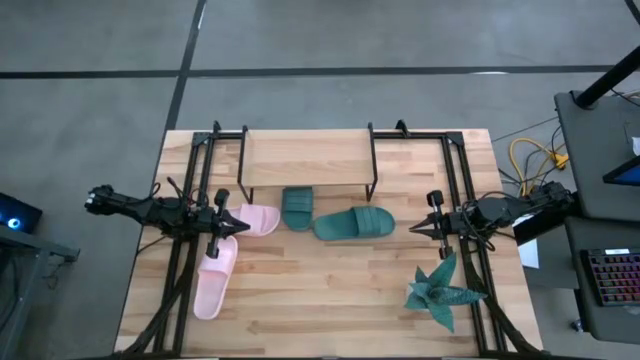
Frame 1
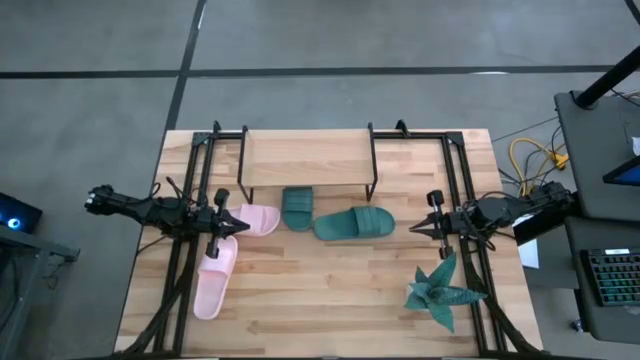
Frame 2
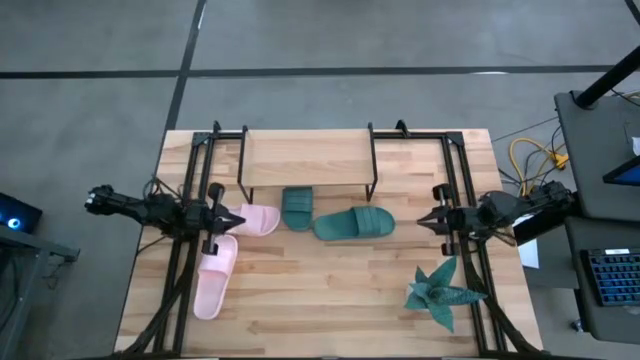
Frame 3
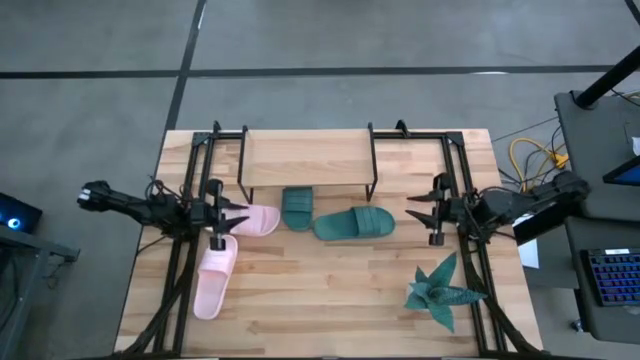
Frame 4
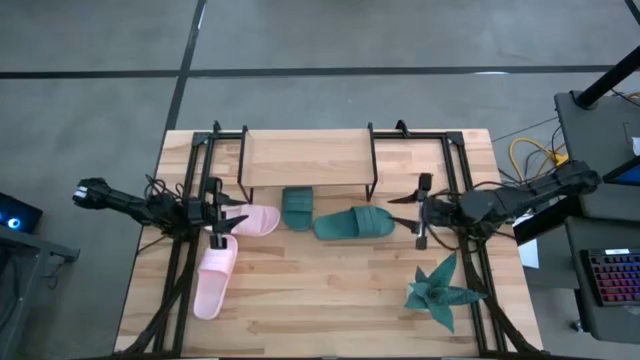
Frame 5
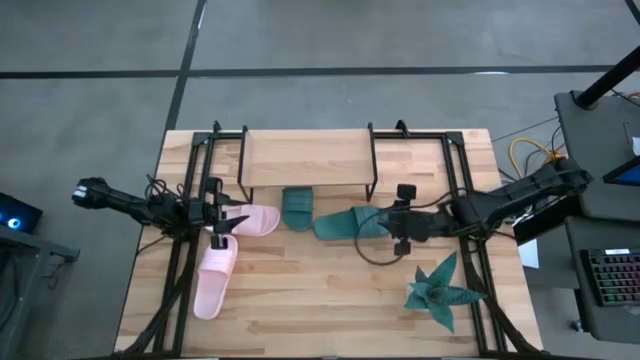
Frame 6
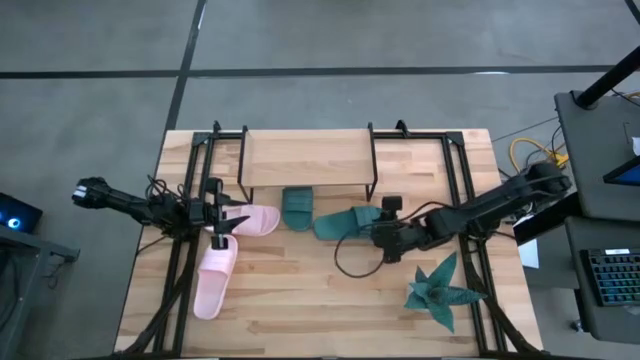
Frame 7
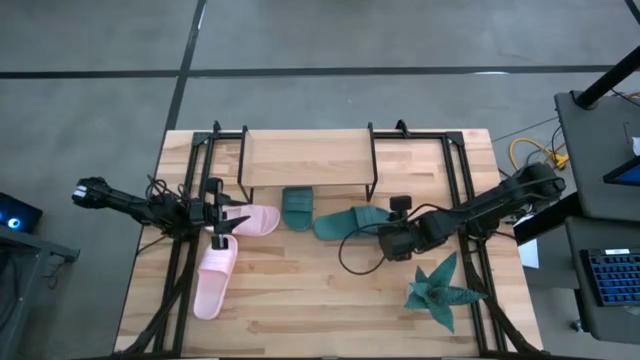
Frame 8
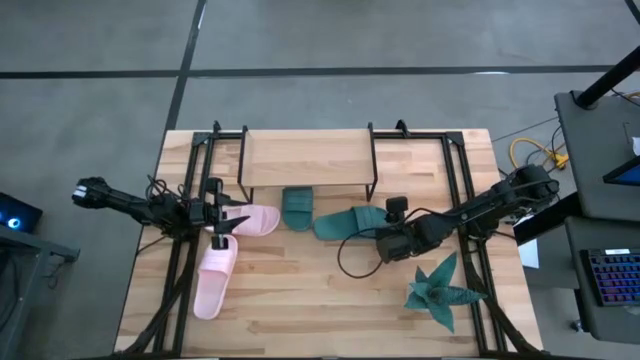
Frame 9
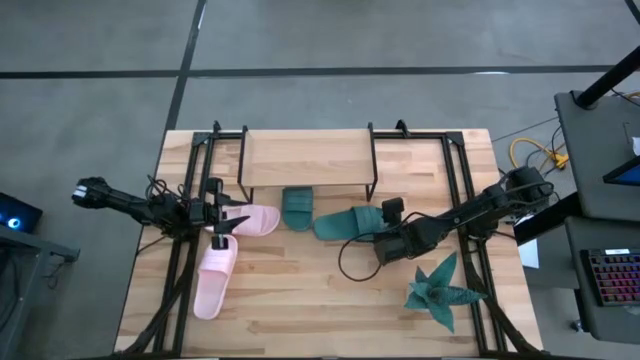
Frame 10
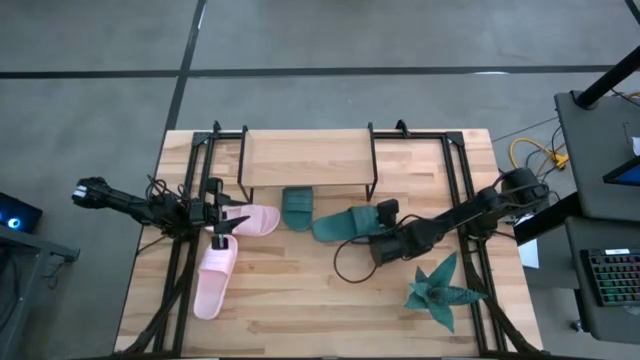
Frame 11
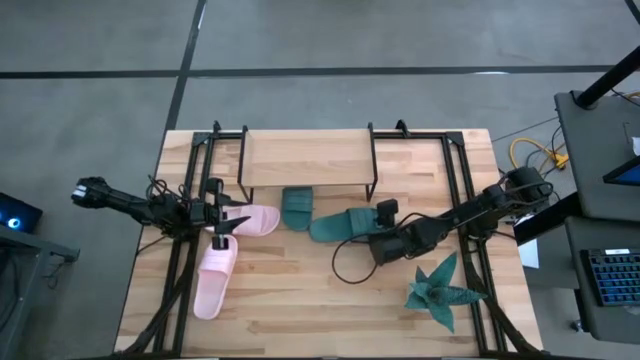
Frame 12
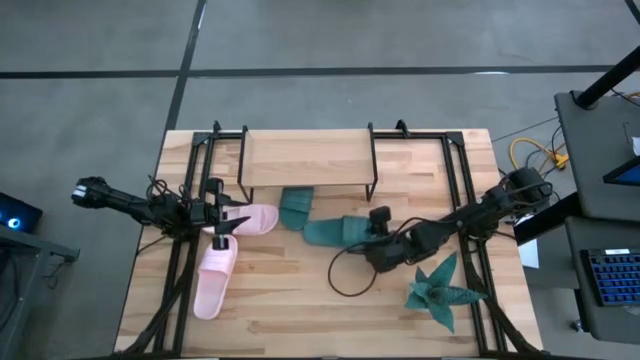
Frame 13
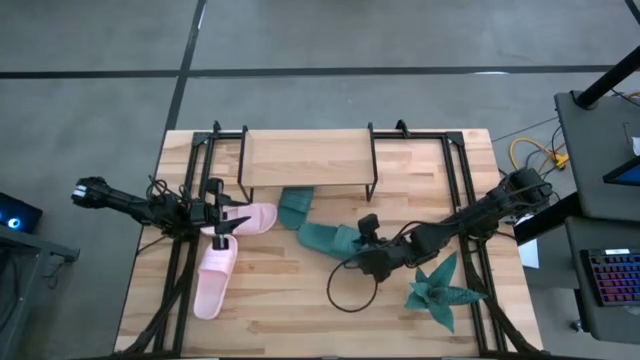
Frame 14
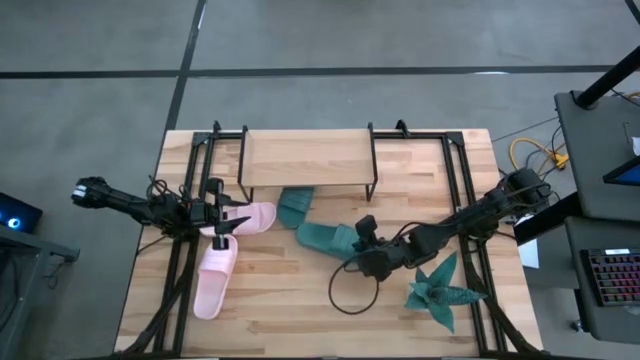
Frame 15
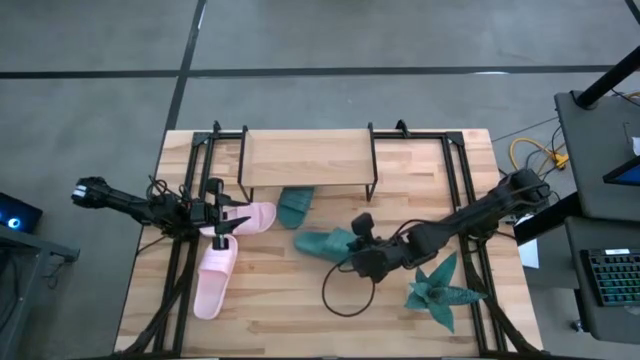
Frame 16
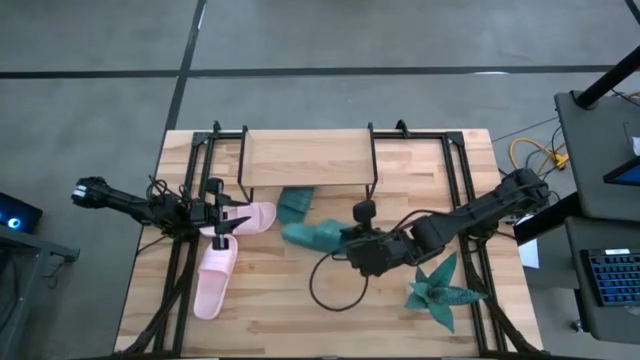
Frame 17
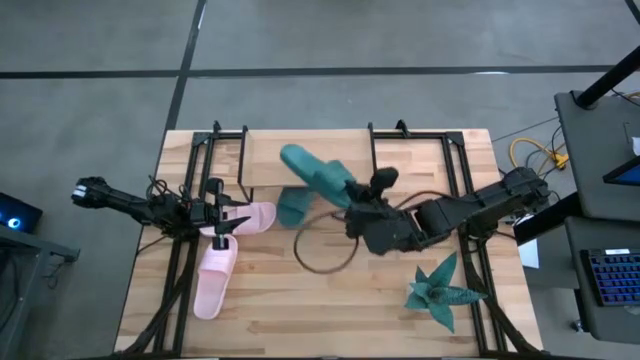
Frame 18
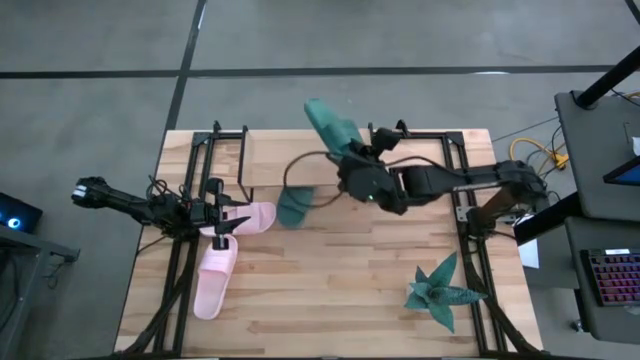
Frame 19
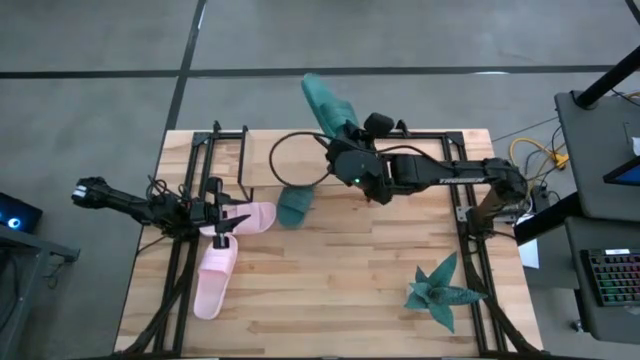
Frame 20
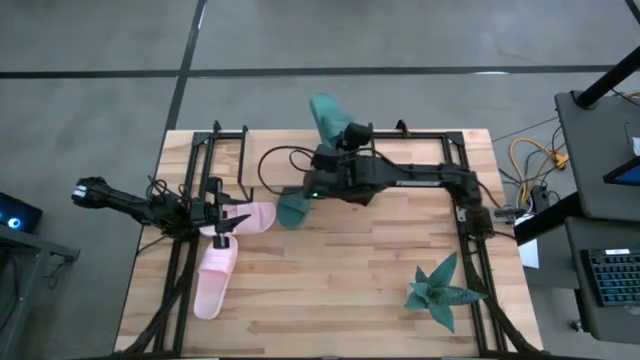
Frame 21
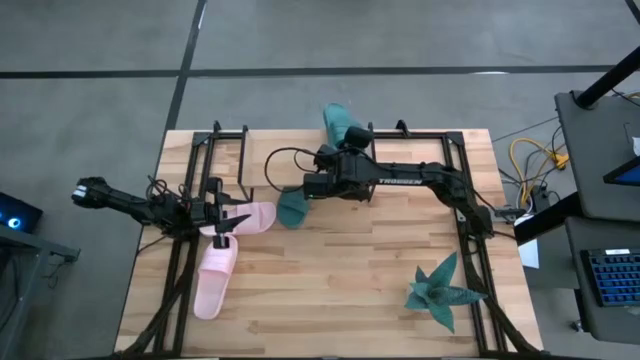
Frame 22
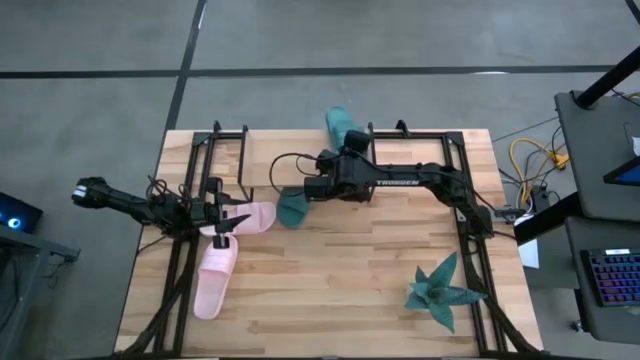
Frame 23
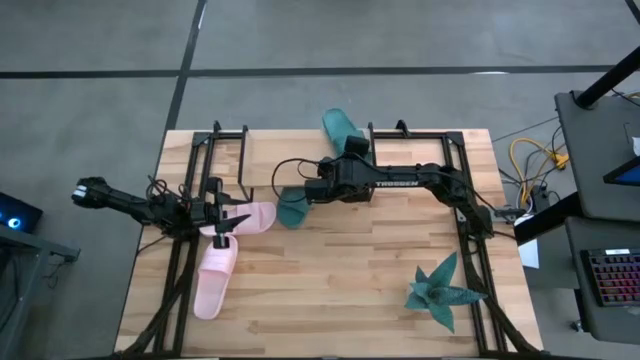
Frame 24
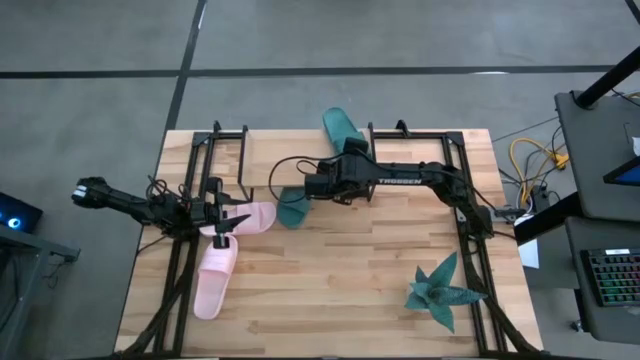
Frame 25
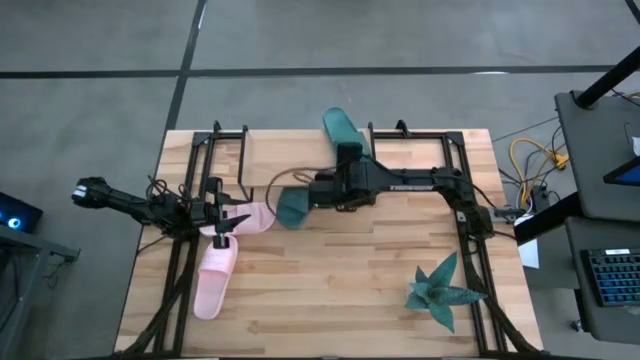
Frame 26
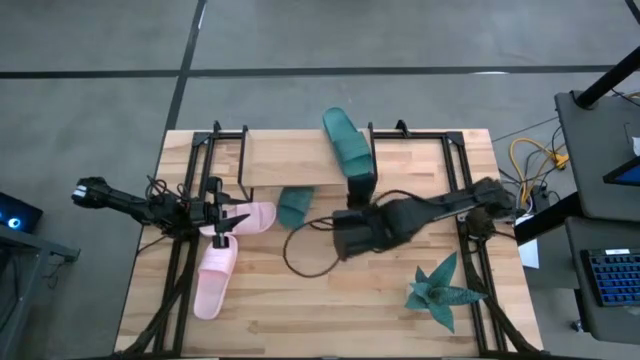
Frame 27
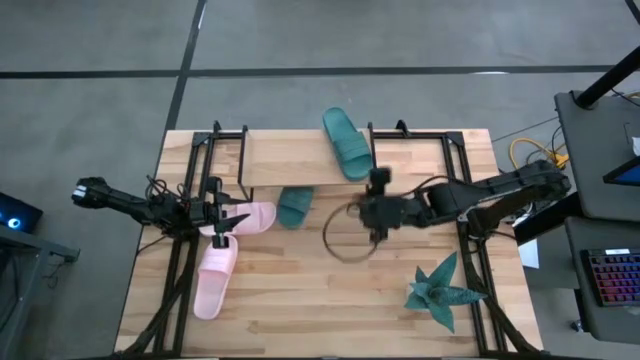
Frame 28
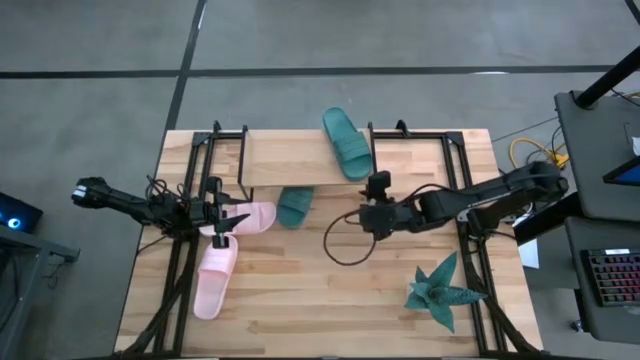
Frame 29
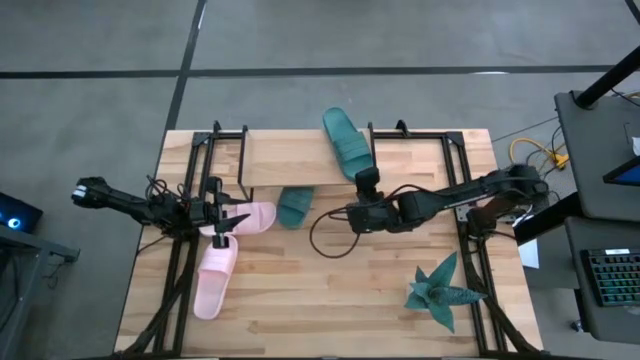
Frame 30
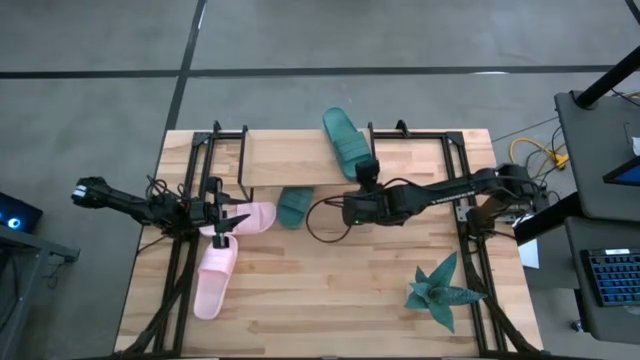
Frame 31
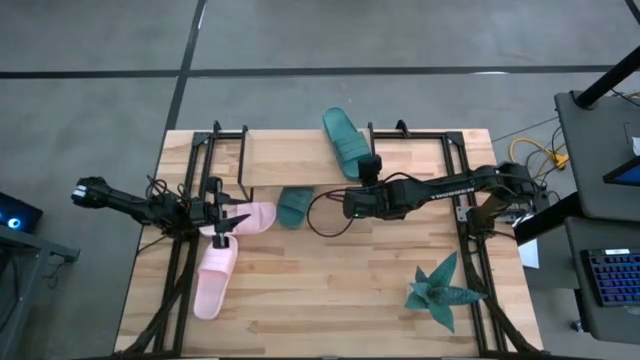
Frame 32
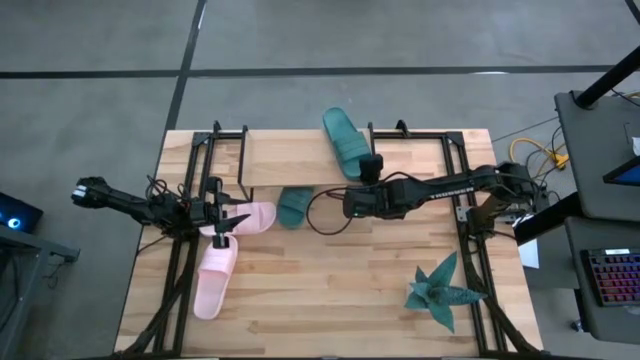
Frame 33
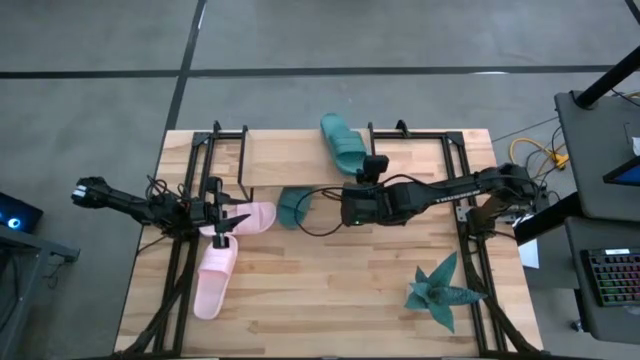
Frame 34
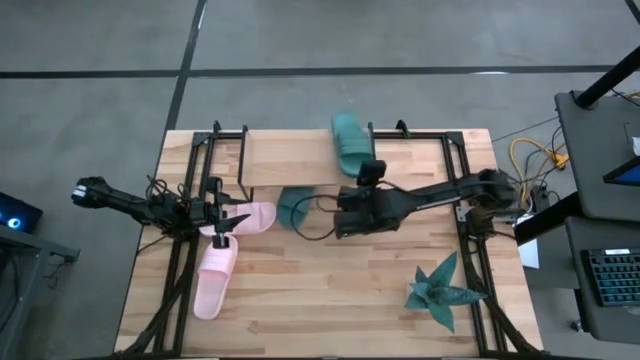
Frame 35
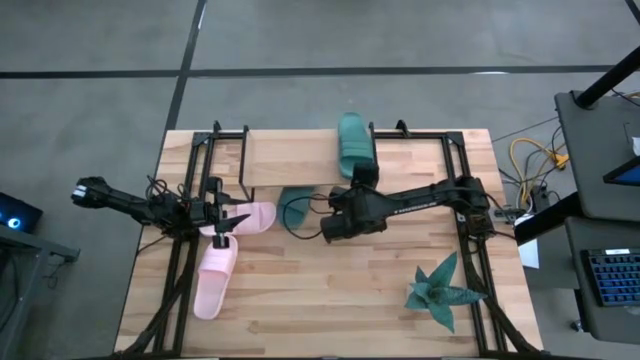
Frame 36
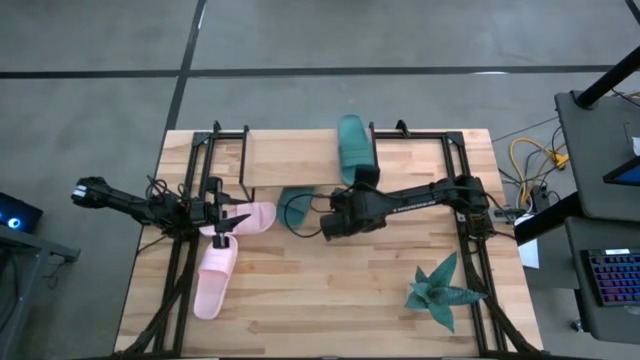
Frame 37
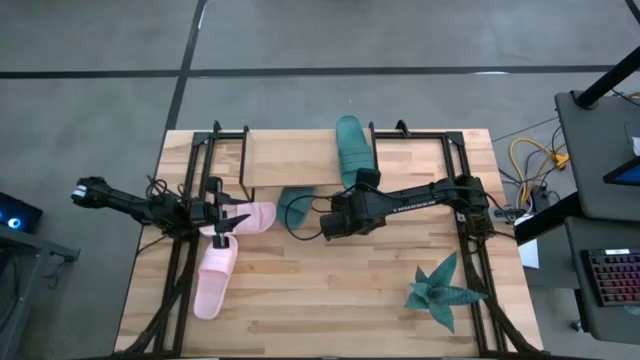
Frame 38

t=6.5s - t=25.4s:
Task: Pick and place slides into the shelf
Put the right green slipper on the shelf
